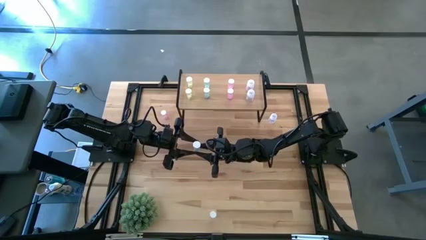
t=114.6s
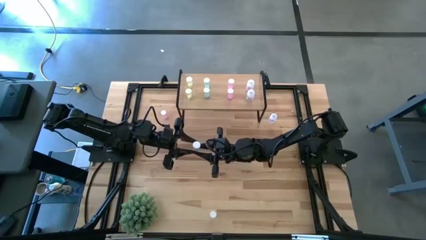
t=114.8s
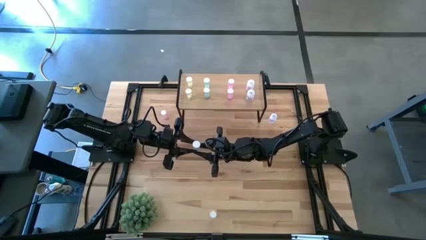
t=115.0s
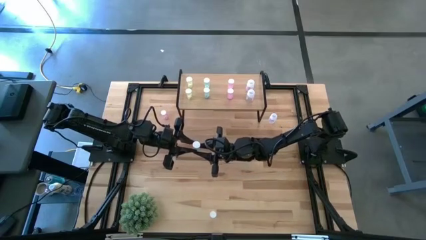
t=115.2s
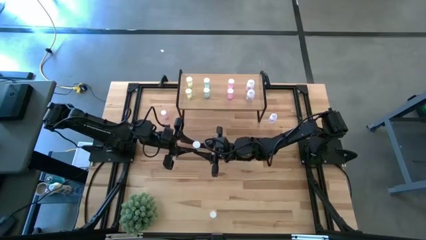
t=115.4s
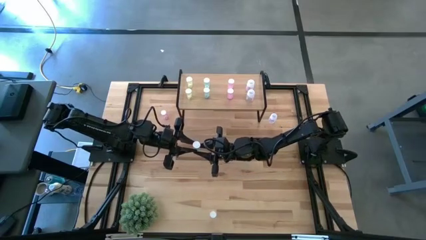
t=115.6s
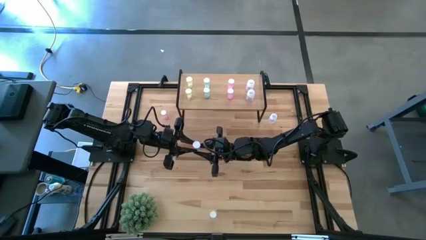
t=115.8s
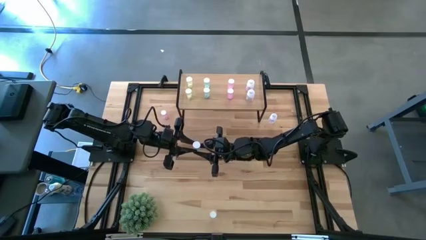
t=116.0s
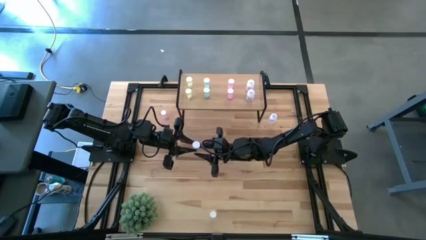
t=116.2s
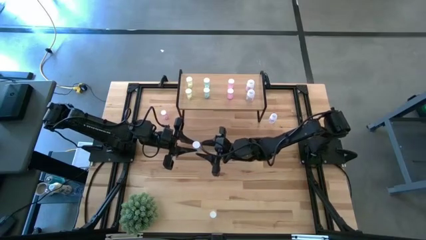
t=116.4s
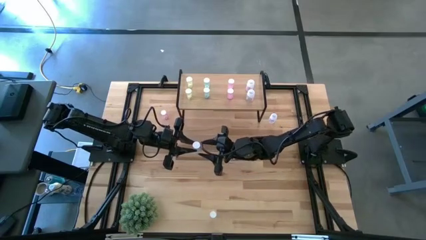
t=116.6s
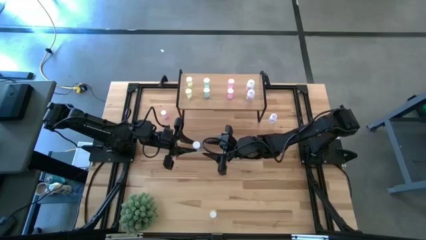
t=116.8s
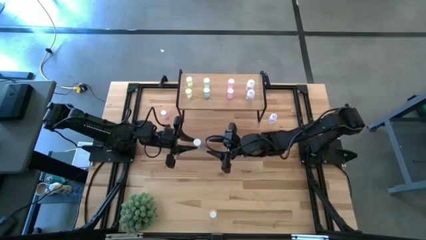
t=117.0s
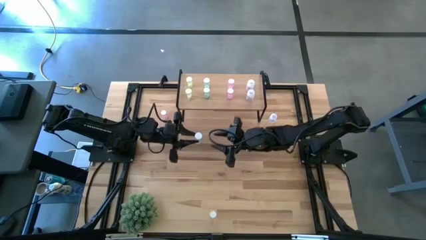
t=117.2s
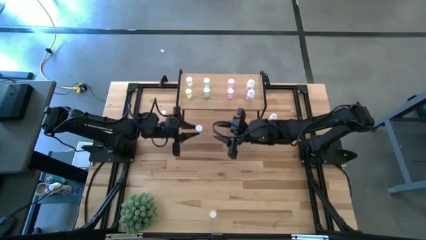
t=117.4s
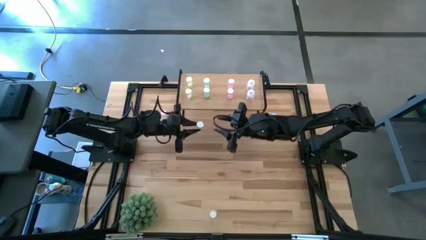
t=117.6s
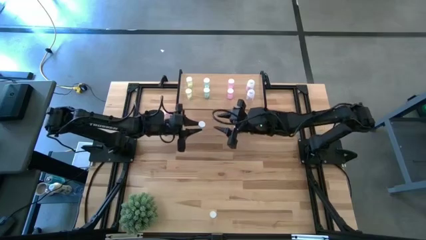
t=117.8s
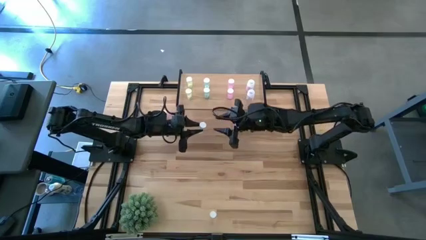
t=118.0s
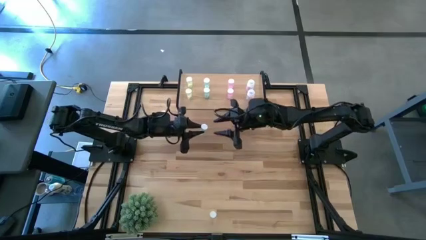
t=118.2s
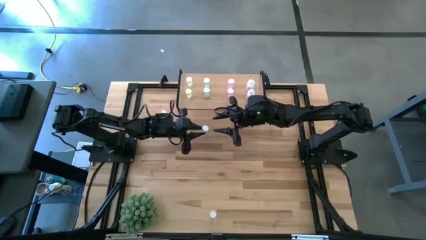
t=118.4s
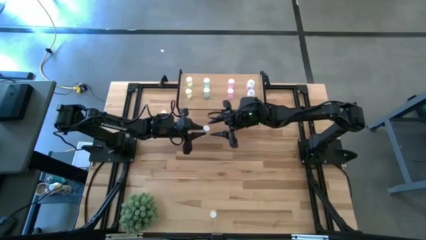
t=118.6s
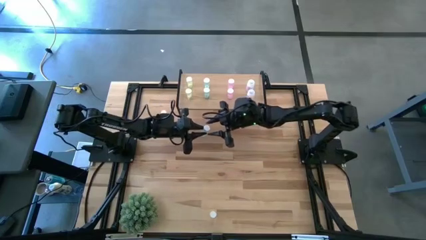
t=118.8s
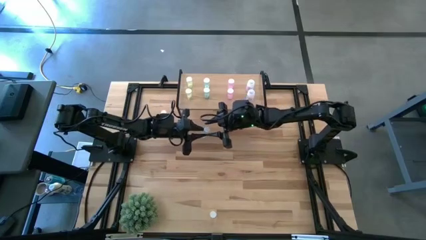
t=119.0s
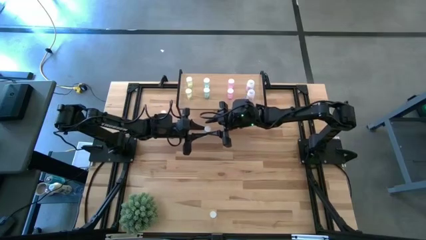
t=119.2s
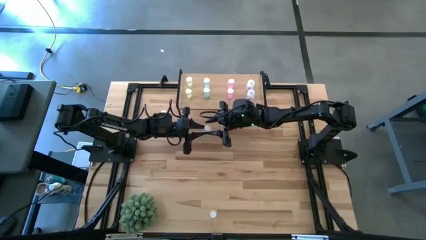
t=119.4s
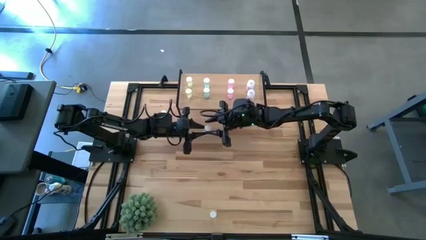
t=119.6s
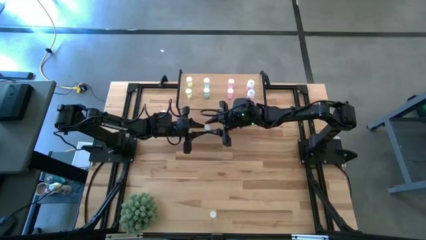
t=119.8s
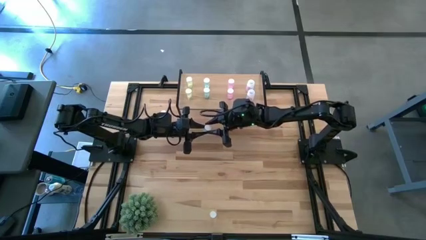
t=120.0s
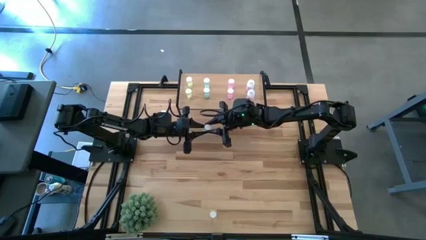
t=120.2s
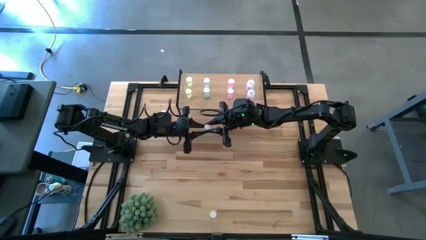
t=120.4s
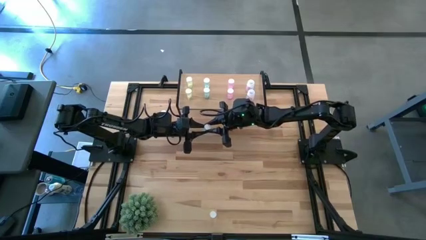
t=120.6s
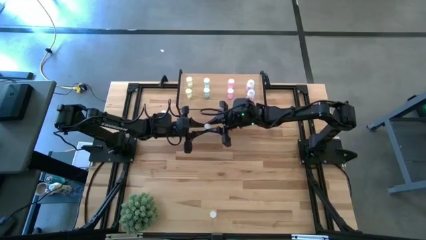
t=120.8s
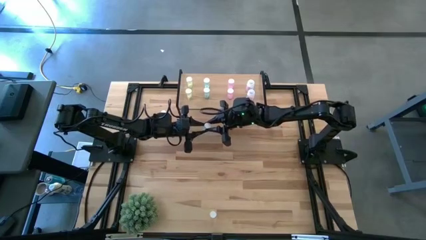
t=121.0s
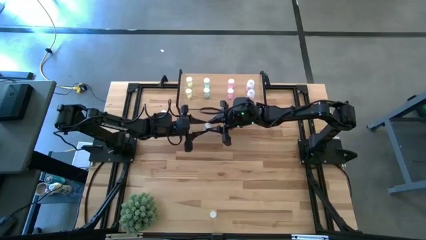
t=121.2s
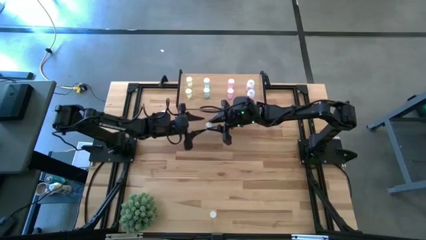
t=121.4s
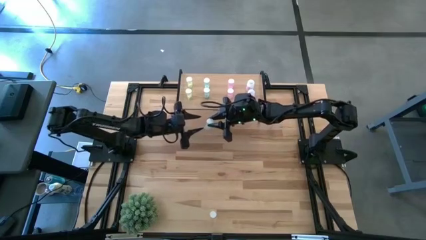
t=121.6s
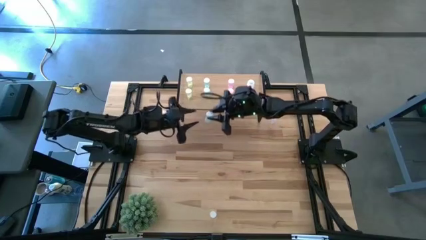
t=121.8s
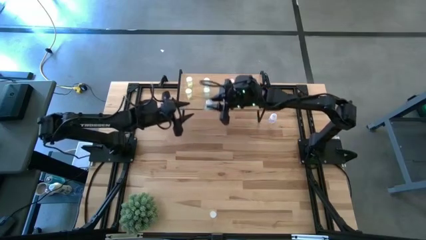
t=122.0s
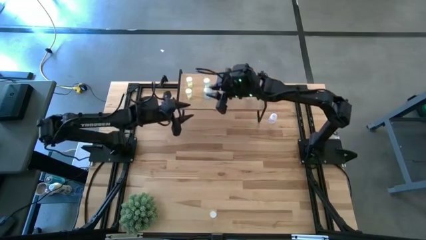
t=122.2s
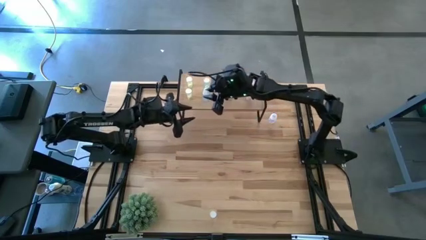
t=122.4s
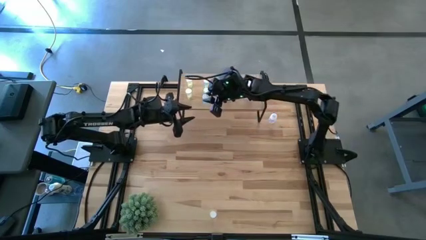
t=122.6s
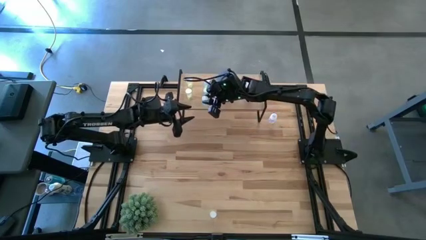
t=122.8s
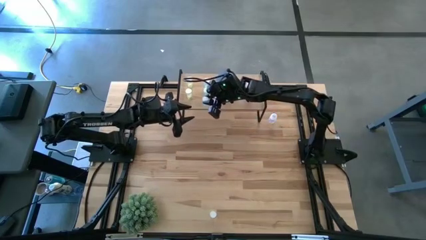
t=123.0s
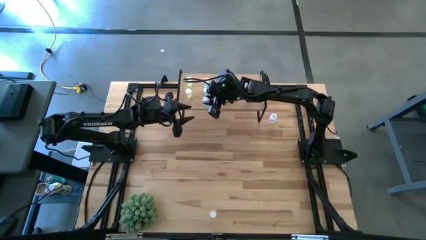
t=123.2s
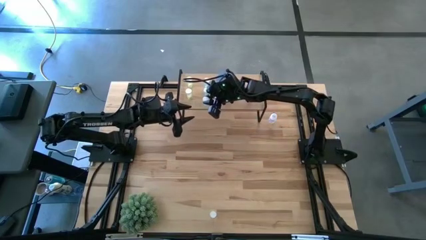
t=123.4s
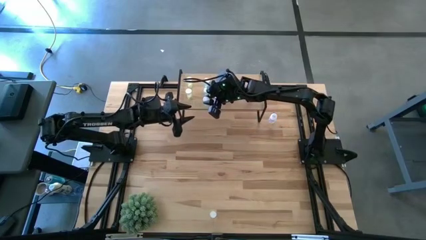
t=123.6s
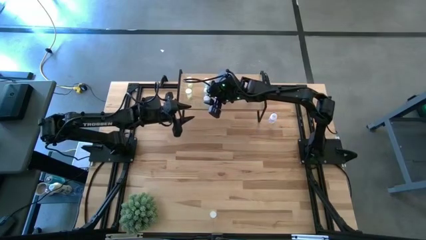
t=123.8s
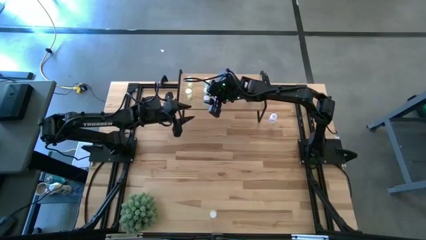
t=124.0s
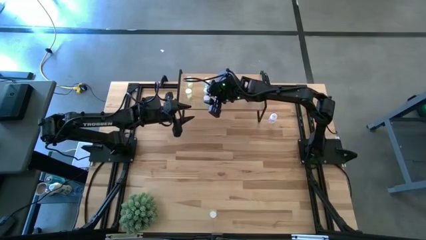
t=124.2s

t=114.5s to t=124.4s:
Task: Pick and place medicine bottles onto shelf by color
Put the blue pill bottle and align it with the other blue pill bottle on the shelf

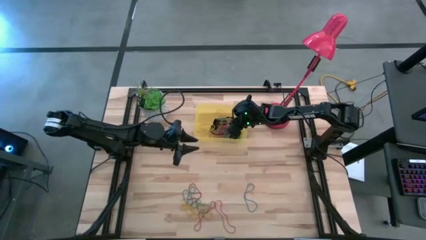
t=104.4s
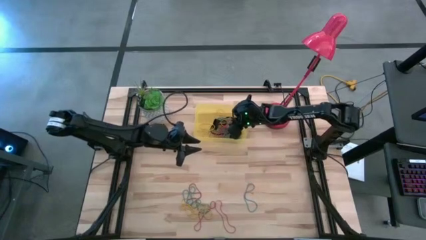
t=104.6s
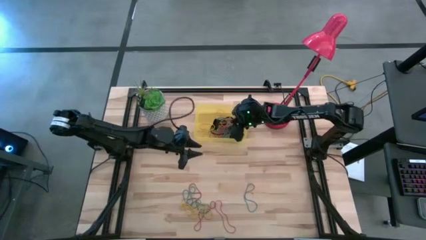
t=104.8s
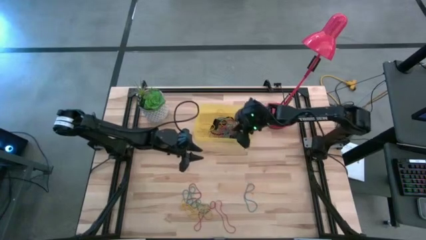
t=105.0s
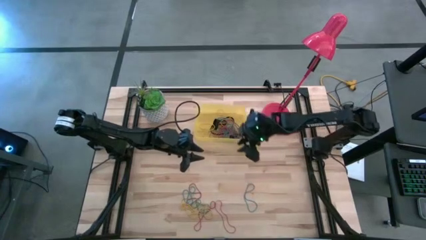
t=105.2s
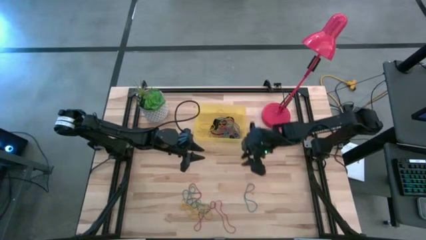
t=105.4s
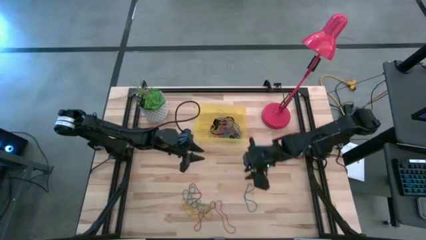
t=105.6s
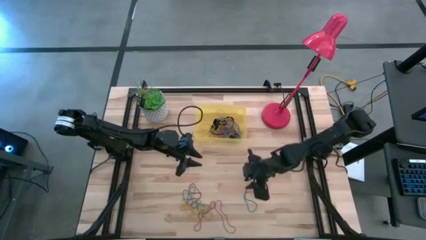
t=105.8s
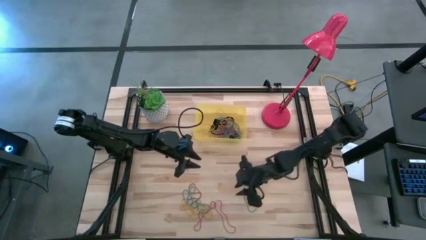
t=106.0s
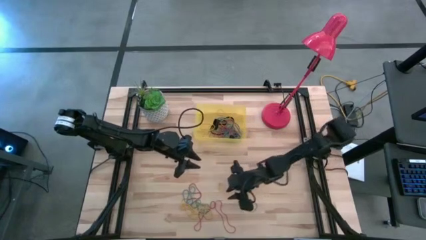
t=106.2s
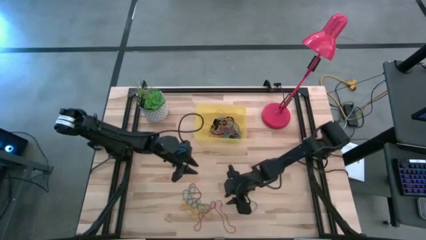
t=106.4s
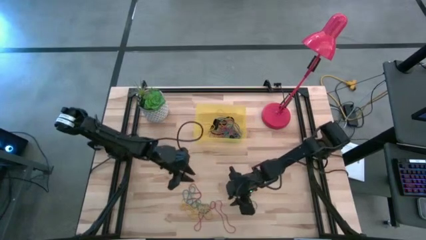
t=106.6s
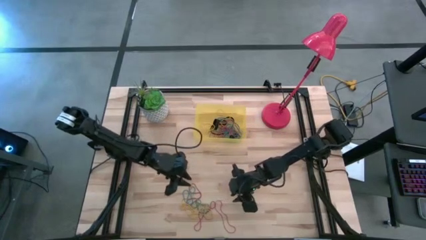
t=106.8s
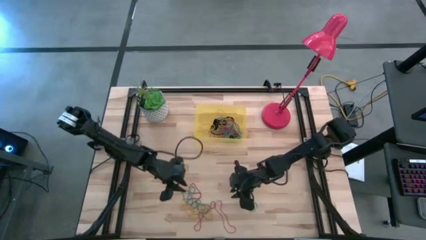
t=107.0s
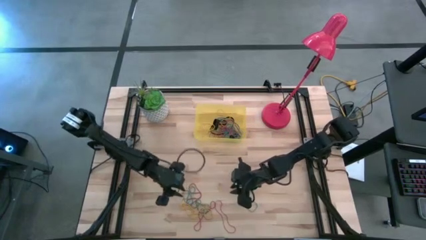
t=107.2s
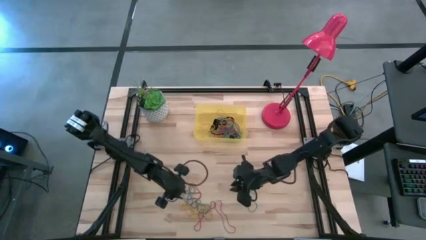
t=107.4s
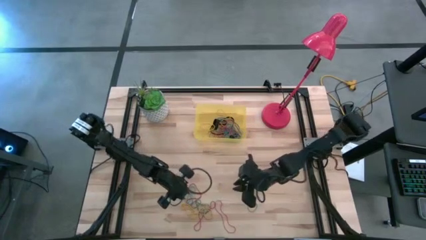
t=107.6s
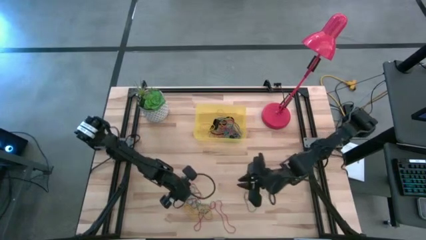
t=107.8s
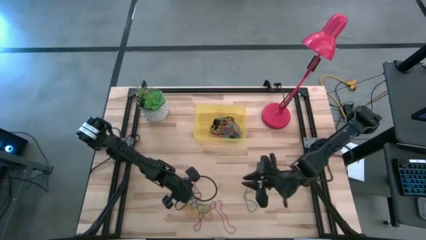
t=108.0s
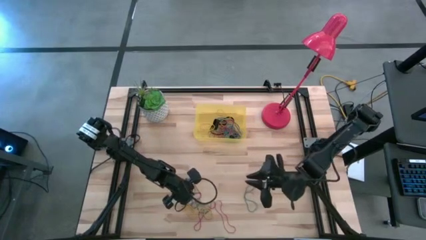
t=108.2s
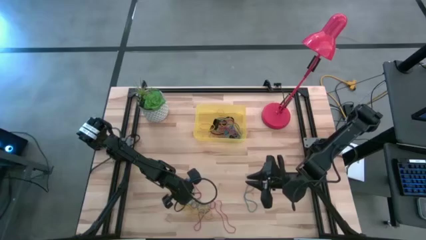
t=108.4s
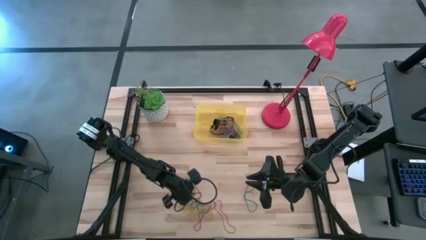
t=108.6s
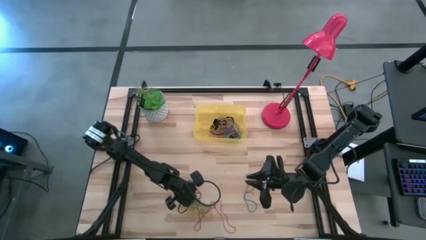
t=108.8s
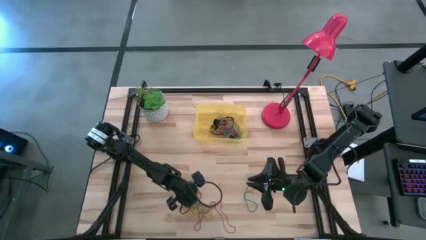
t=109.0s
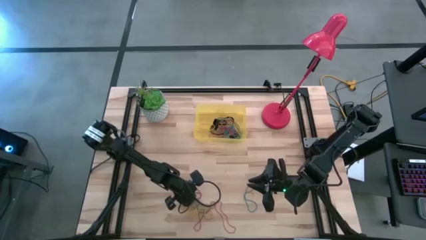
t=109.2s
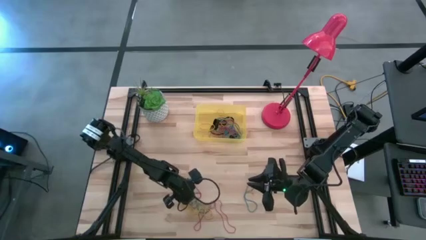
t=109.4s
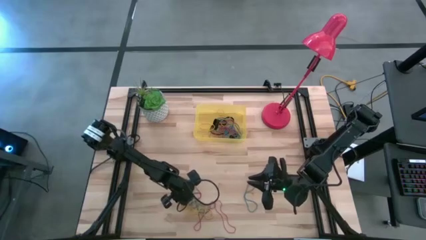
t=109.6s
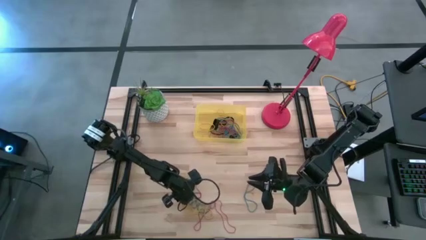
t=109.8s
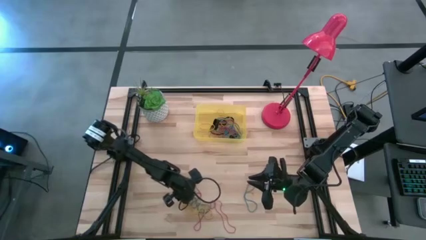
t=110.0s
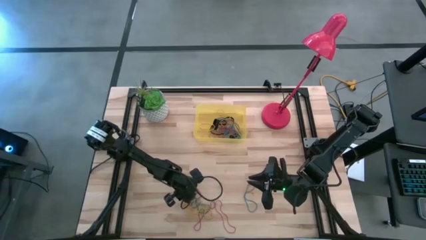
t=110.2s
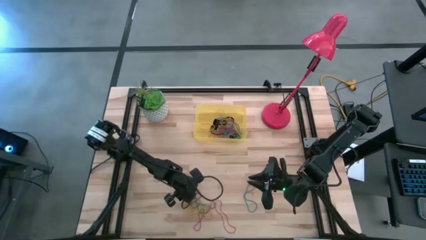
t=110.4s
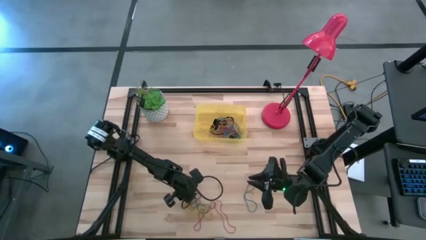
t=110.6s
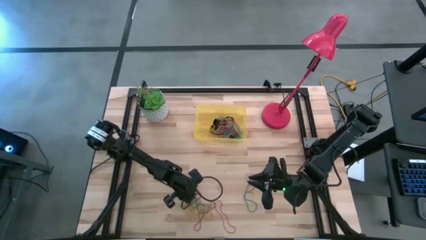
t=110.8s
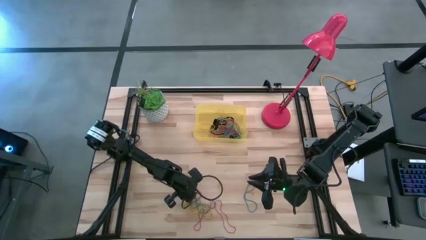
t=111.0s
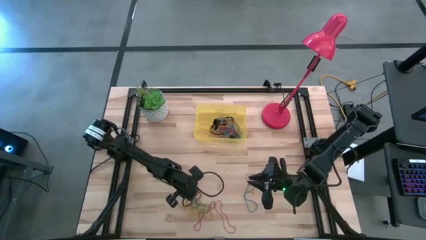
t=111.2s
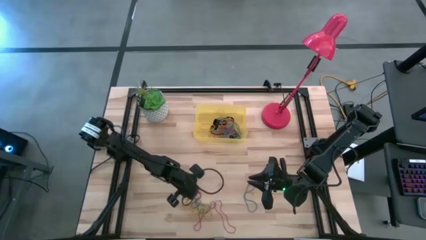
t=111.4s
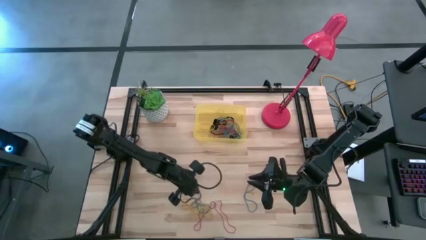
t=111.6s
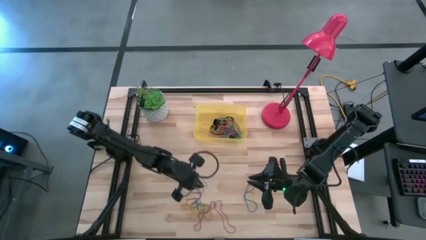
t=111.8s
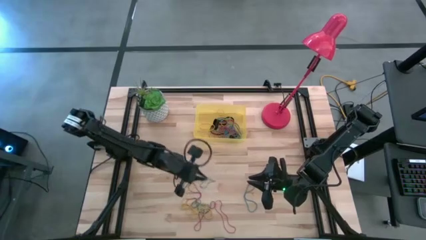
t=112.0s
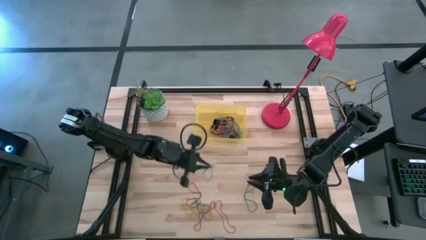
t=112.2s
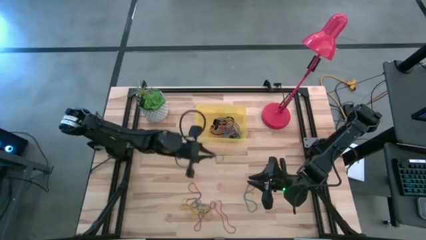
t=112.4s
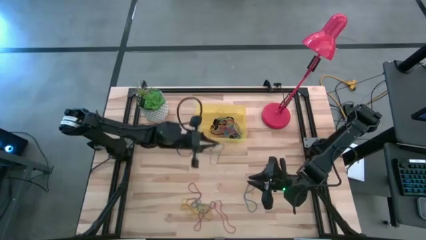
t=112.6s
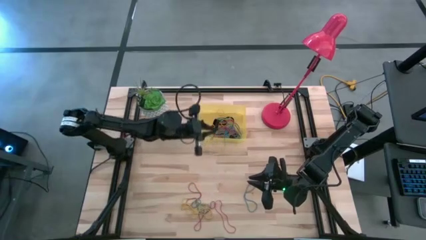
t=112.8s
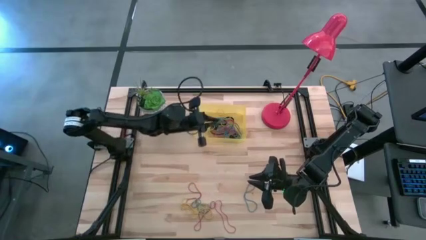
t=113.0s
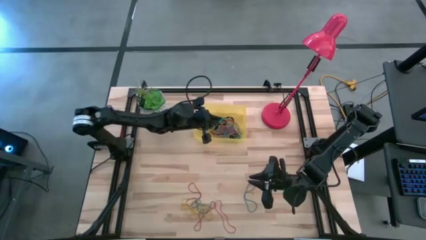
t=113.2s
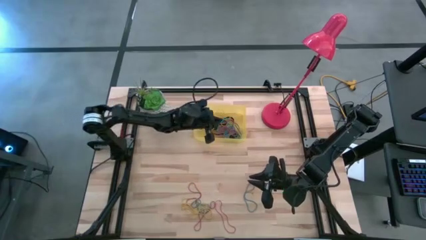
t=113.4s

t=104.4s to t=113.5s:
Task: Pick and place rubber bands into bin
Put the blue rubber band into the yellow bin
